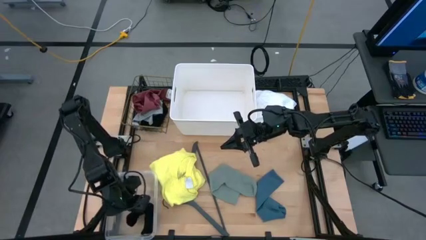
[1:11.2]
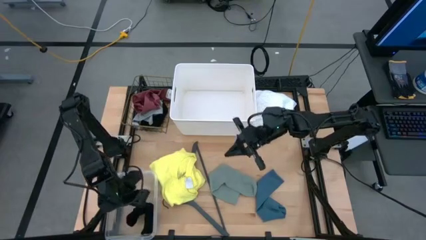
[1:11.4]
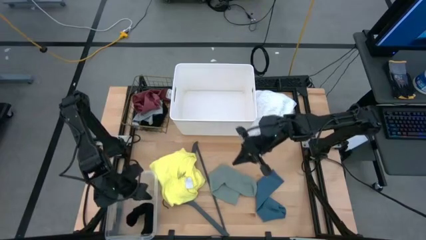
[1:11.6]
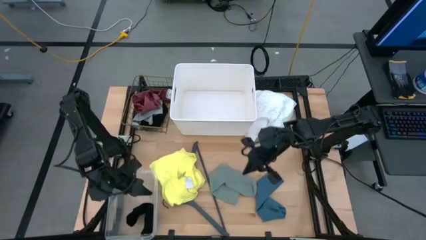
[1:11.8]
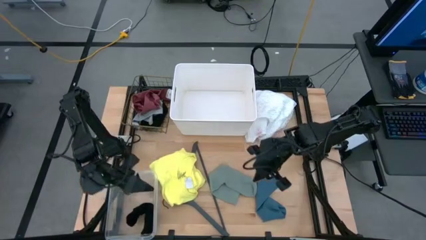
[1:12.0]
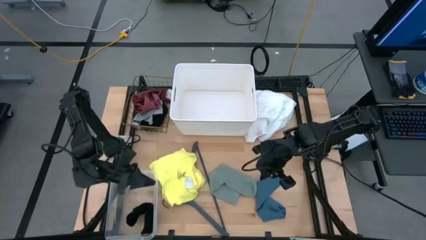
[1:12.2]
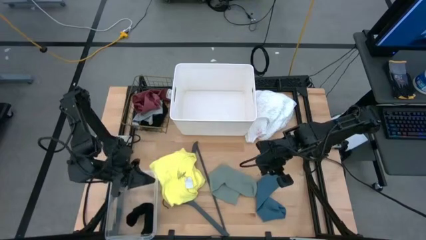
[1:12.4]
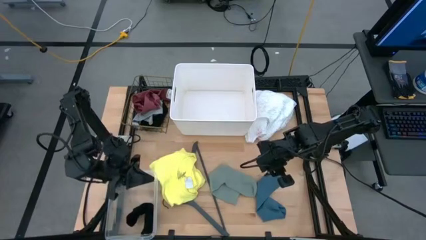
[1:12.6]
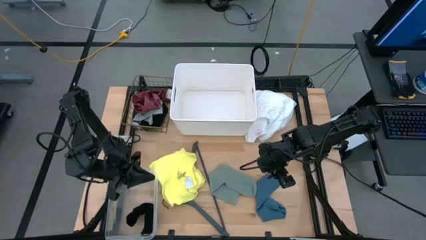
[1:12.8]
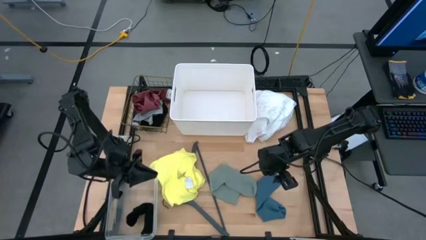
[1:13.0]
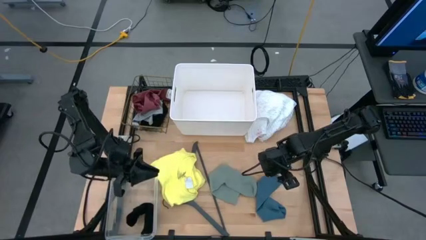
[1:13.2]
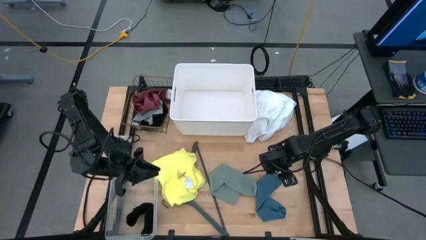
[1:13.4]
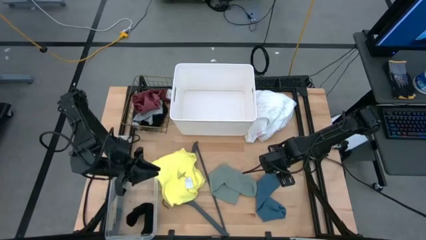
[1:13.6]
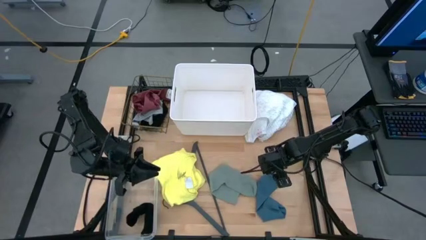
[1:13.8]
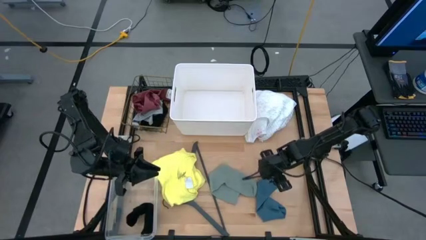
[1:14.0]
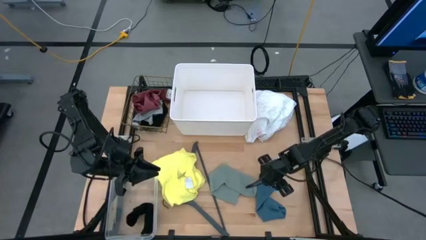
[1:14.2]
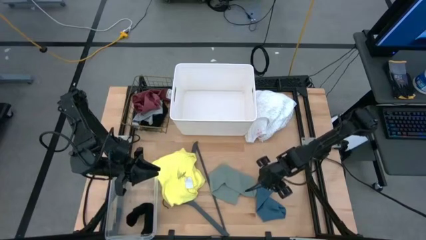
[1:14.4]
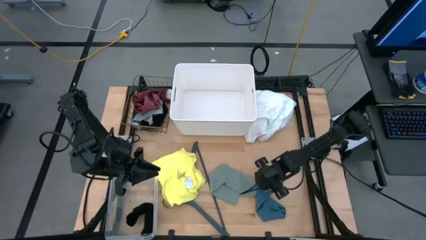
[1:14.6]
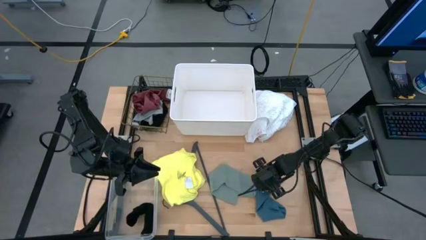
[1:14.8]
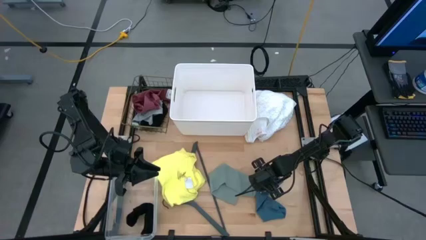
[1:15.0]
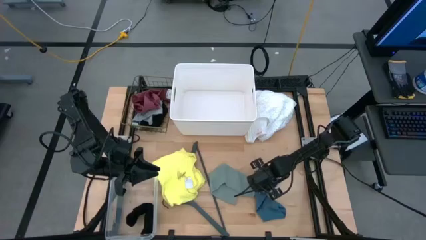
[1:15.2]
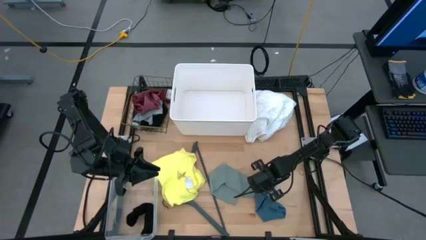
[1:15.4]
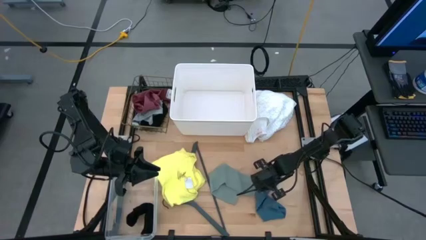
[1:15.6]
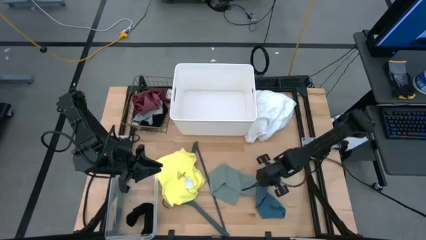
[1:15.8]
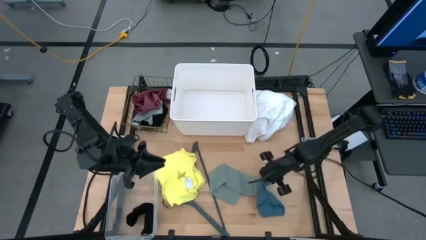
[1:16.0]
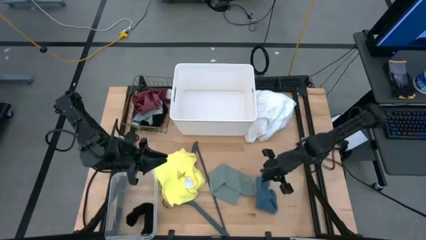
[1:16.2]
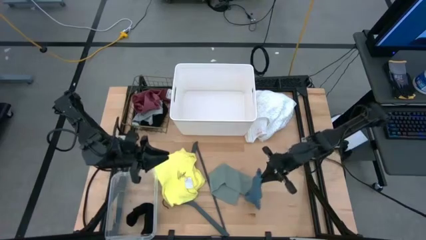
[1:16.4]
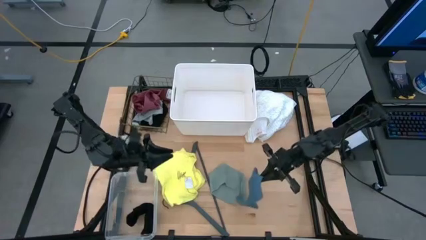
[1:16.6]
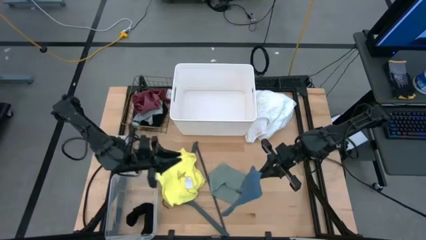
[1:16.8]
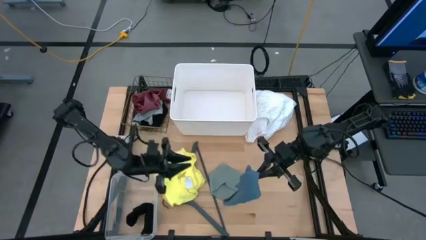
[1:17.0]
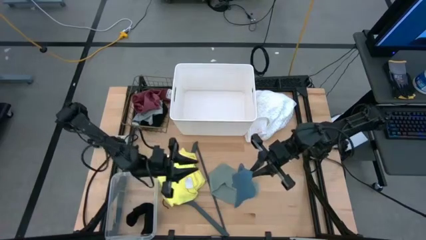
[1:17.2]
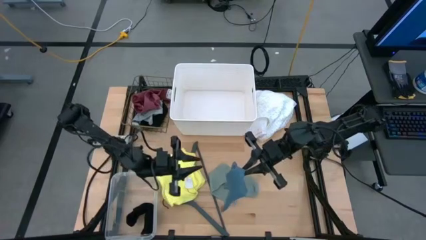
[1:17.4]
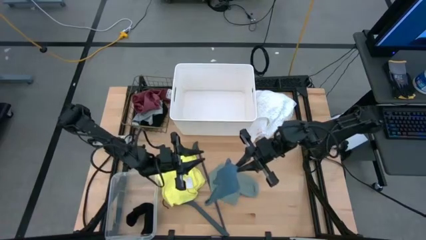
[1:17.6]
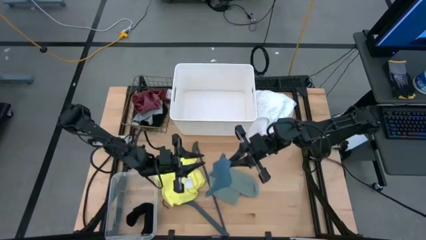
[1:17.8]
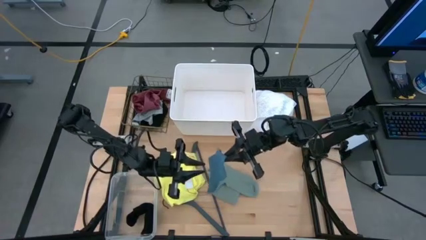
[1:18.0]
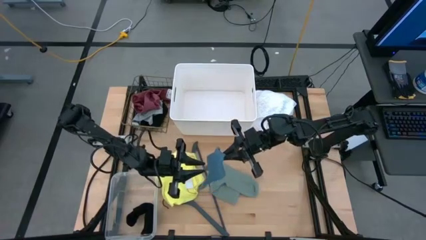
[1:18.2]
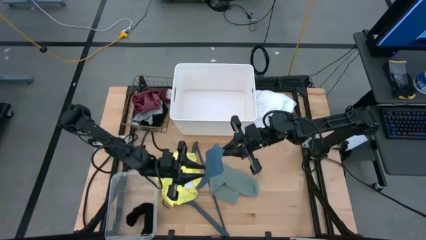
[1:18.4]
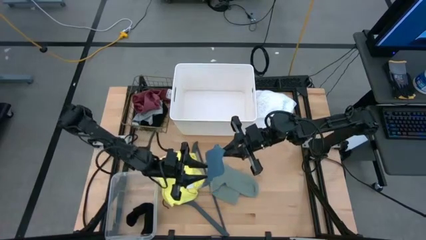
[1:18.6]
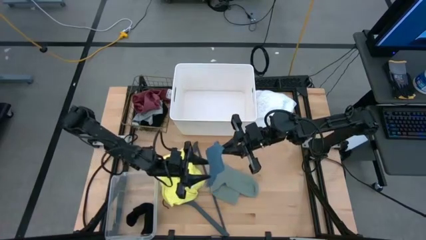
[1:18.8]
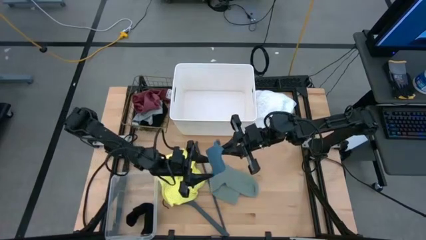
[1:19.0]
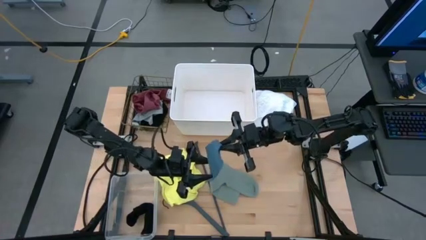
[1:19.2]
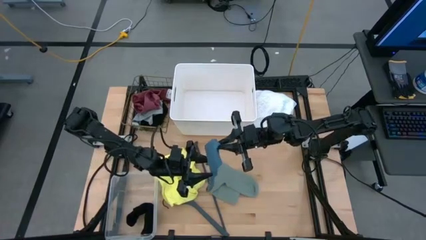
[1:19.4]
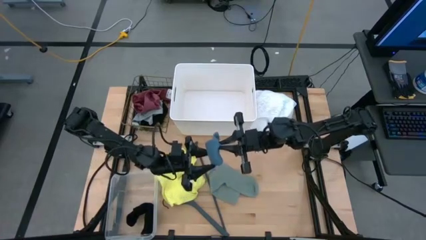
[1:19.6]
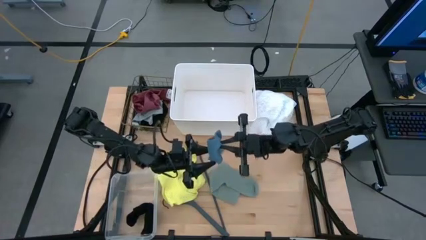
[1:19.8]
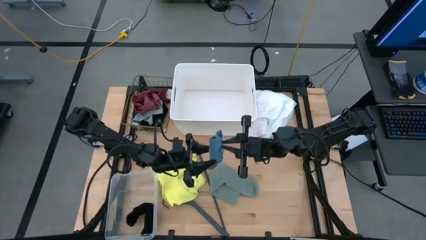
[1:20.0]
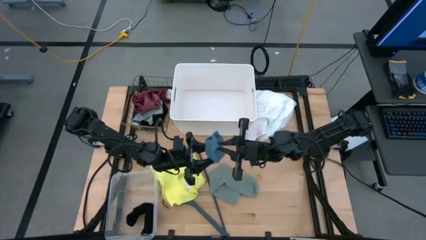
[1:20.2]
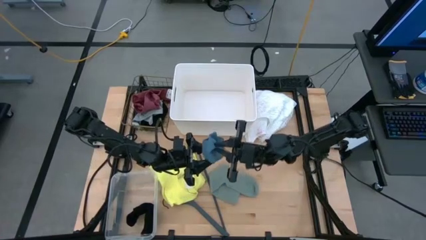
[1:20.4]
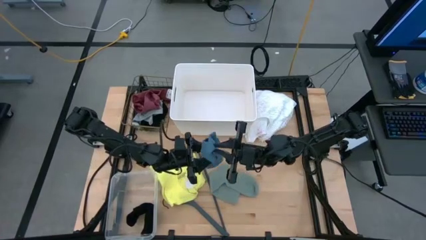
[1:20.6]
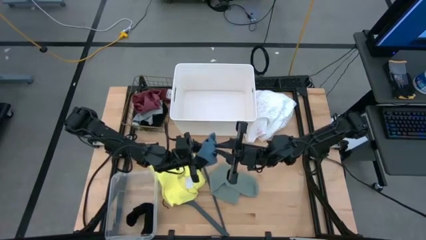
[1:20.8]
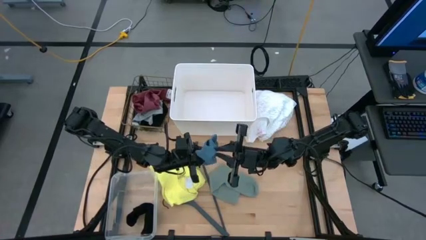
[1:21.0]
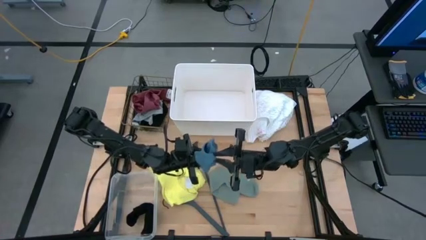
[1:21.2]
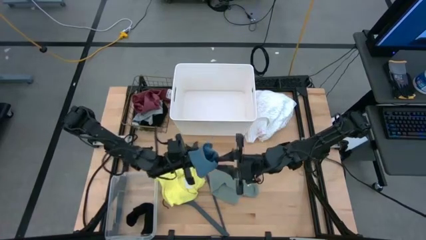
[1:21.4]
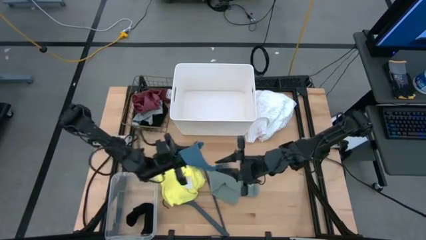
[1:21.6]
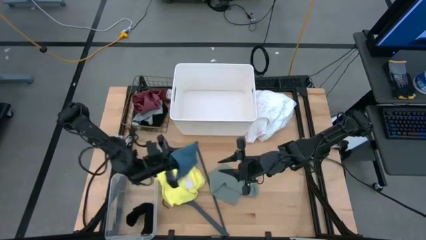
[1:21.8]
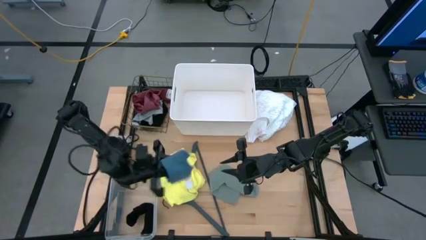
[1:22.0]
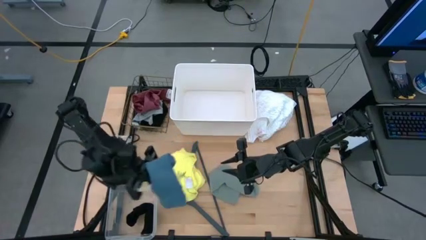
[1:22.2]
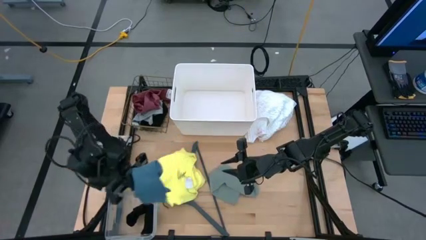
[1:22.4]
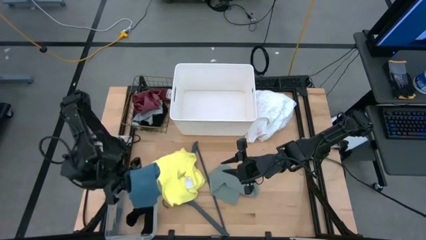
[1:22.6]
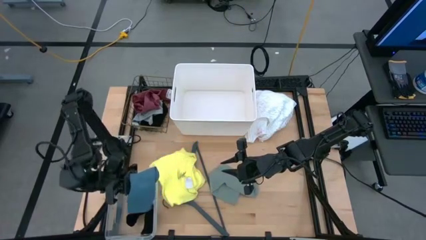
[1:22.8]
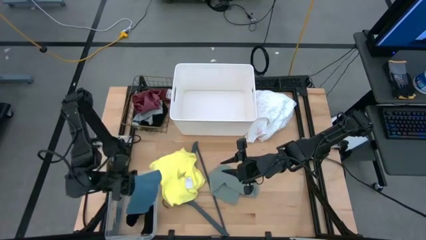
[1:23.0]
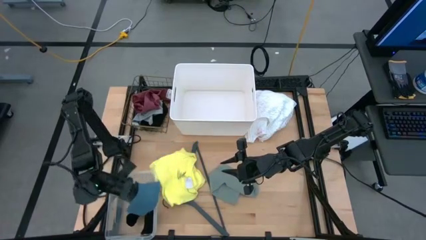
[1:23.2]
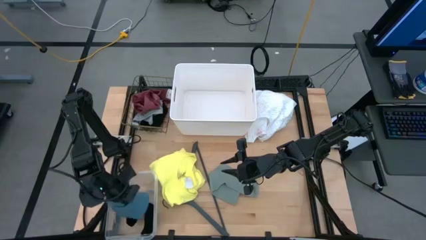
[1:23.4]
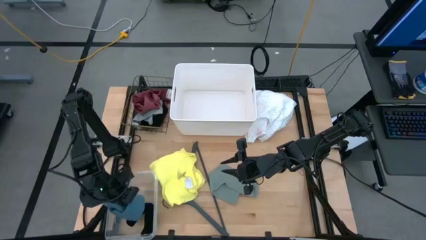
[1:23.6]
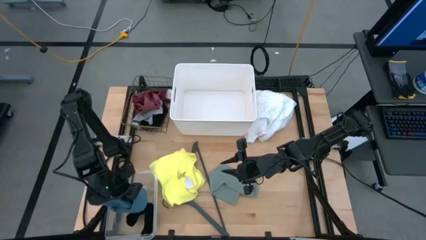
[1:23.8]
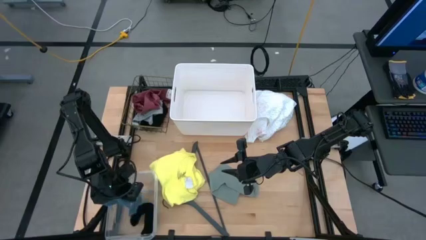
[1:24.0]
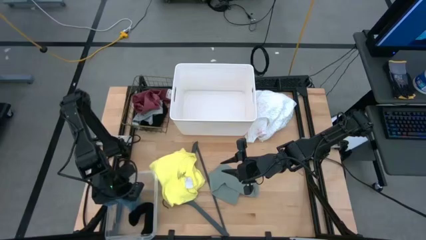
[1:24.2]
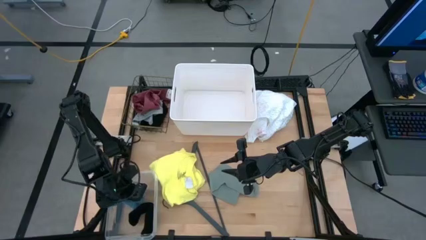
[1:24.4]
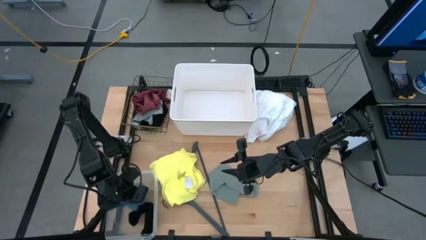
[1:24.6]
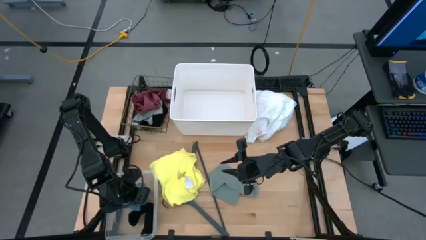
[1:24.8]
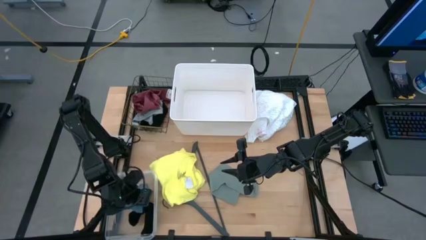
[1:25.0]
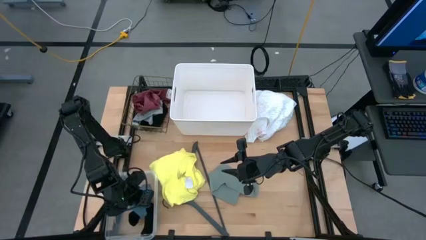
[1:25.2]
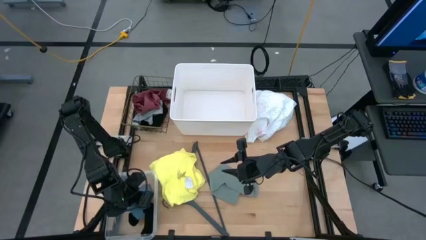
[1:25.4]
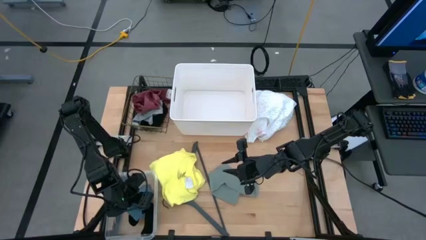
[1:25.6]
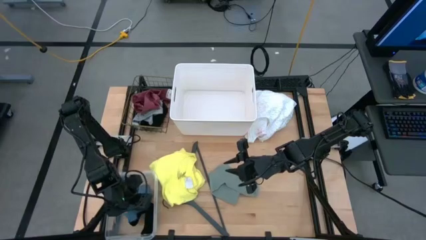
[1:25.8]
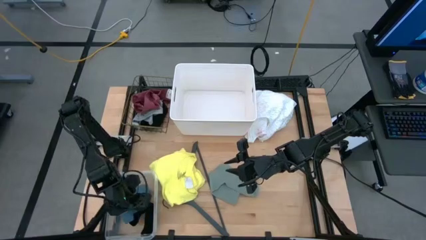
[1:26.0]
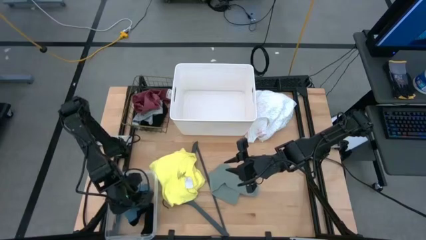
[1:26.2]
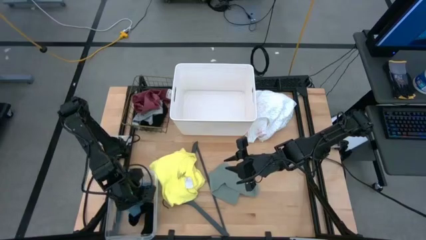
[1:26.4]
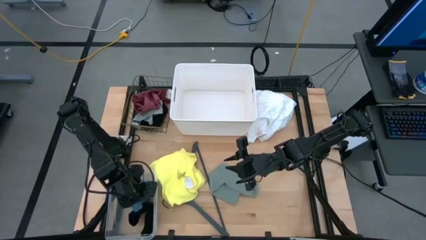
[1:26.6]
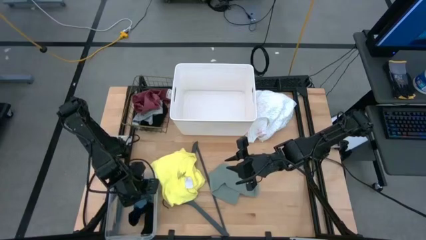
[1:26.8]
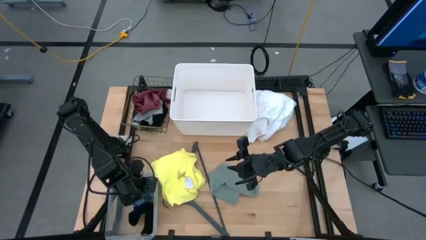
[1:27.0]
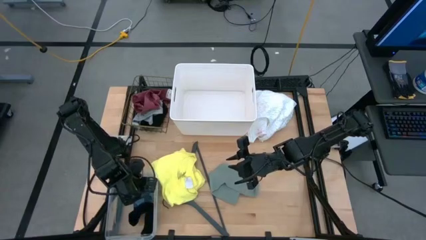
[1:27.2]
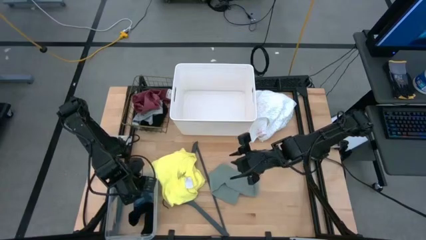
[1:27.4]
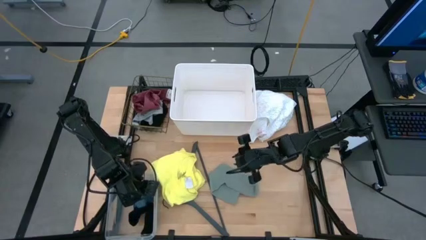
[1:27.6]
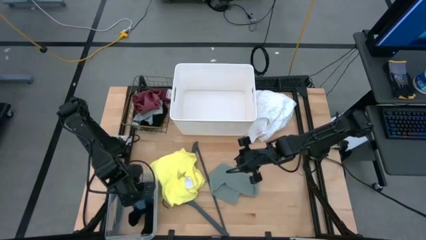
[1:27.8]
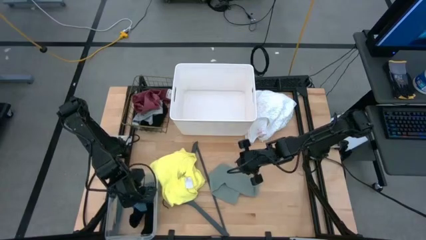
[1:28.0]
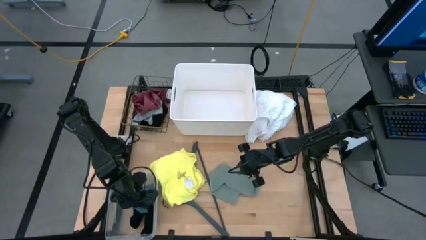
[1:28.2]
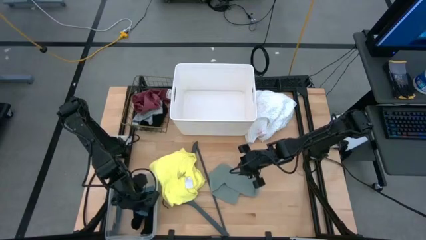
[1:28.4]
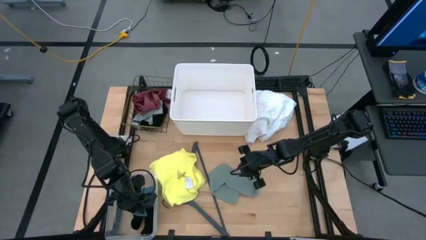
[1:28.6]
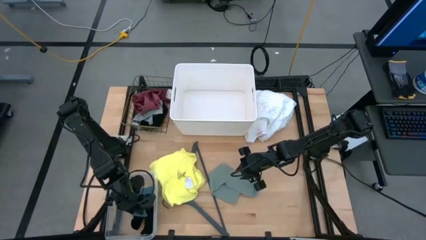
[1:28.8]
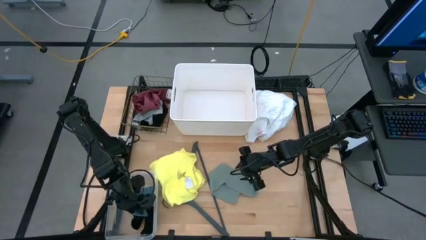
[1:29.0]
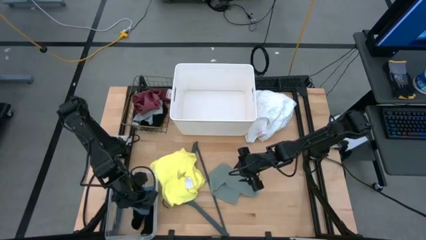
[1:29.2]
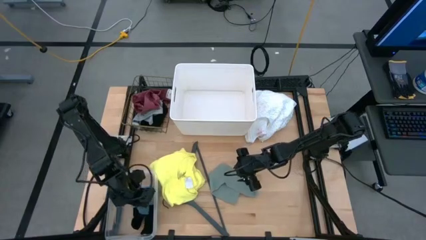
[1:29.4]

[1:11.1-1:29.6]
Task: Pick & Place Cloths
Put the blue sock into the transparent bin
